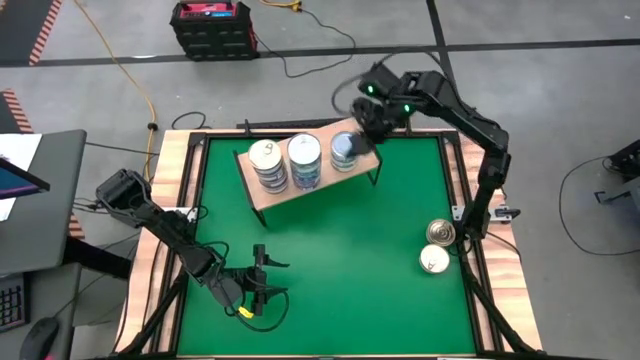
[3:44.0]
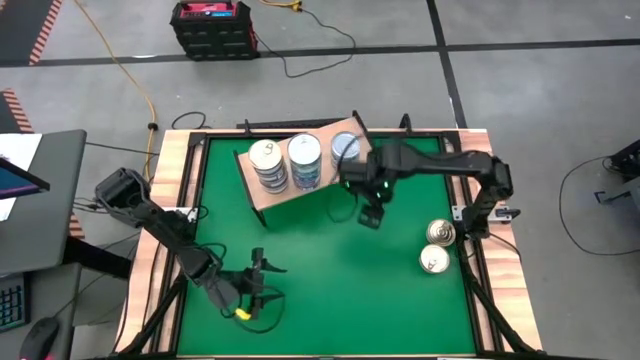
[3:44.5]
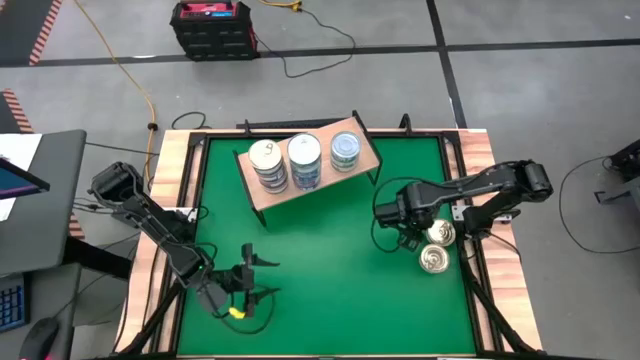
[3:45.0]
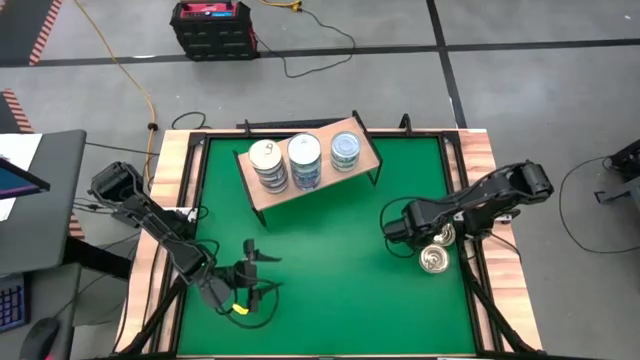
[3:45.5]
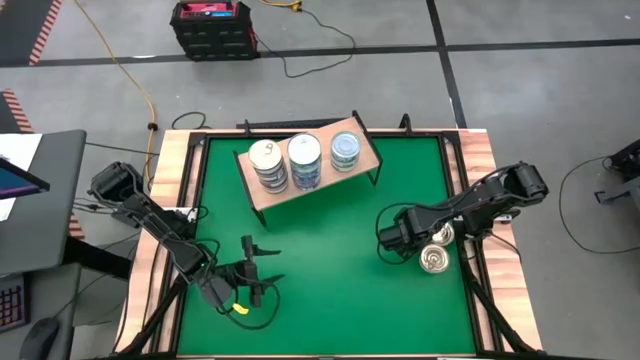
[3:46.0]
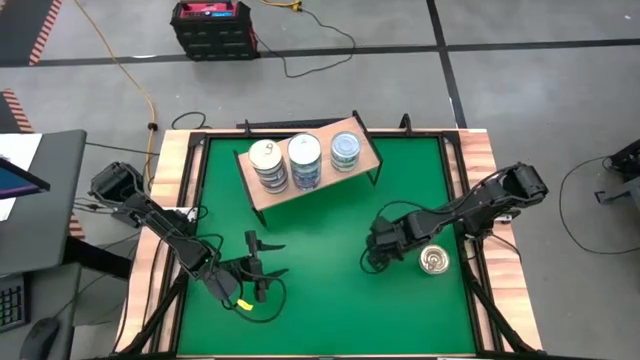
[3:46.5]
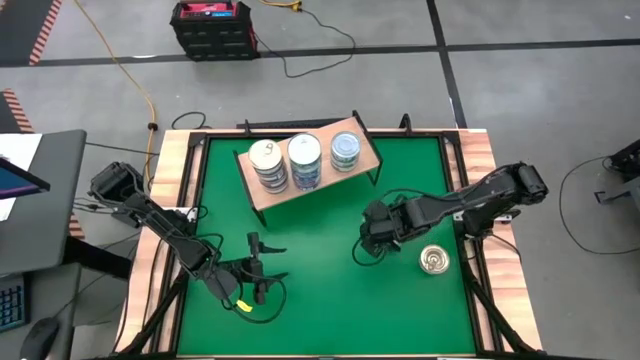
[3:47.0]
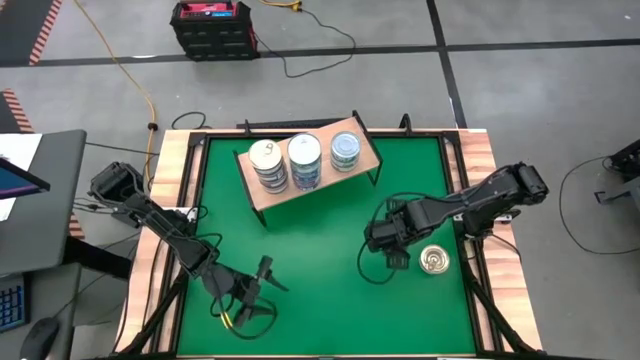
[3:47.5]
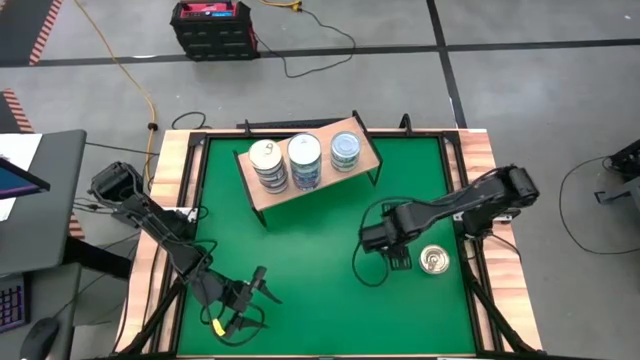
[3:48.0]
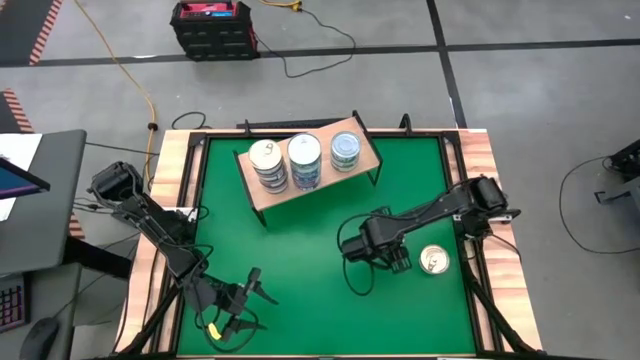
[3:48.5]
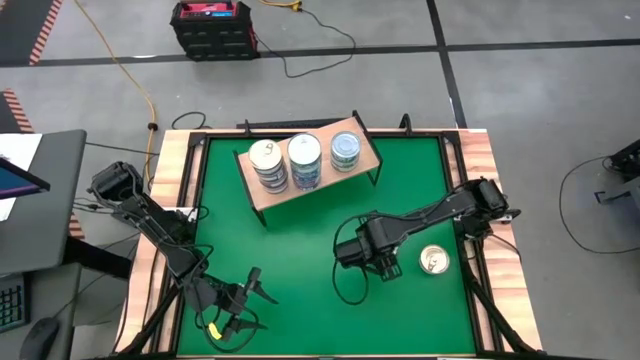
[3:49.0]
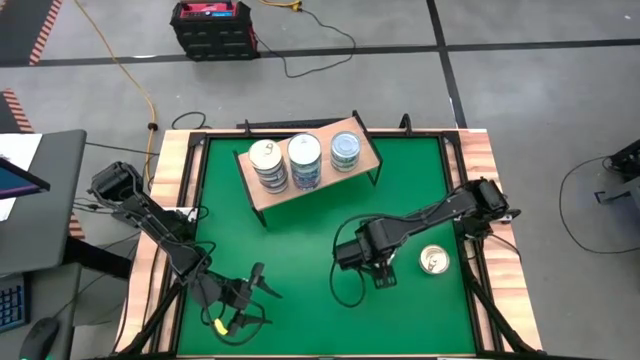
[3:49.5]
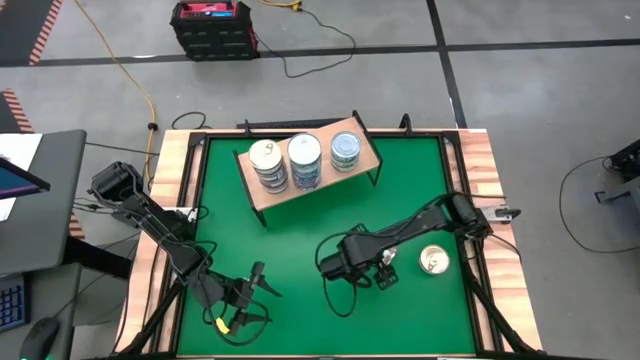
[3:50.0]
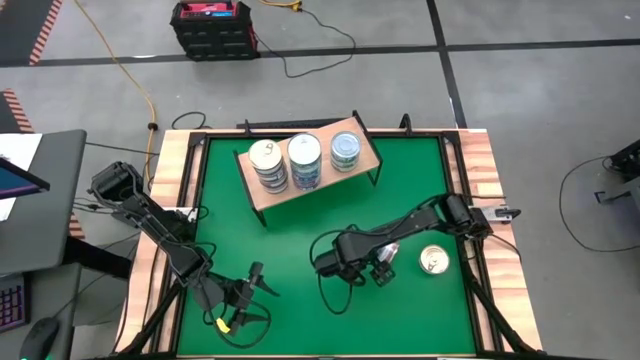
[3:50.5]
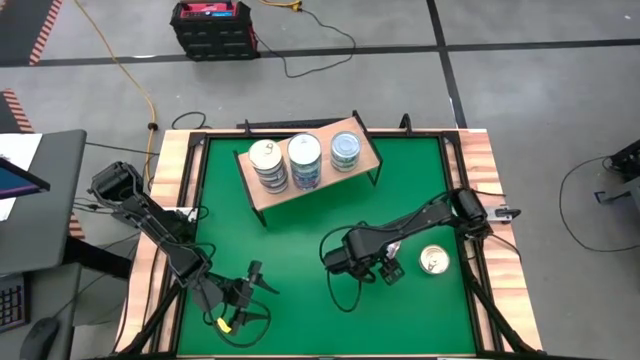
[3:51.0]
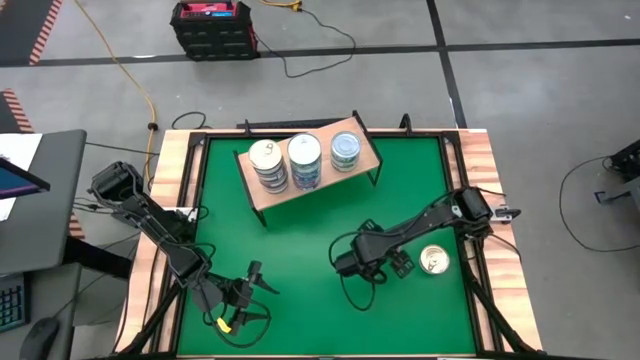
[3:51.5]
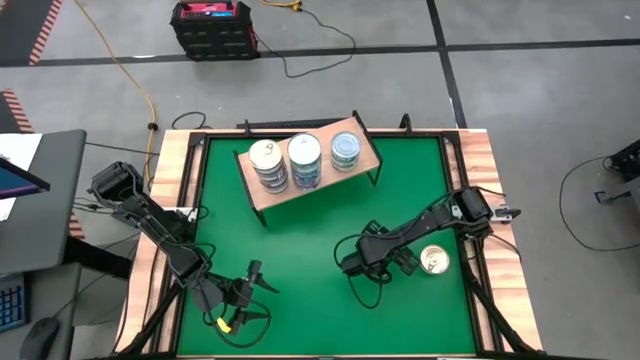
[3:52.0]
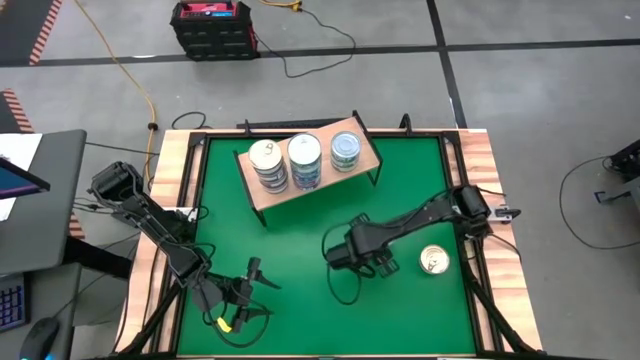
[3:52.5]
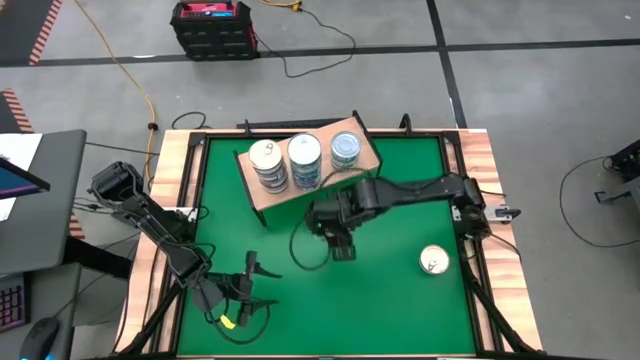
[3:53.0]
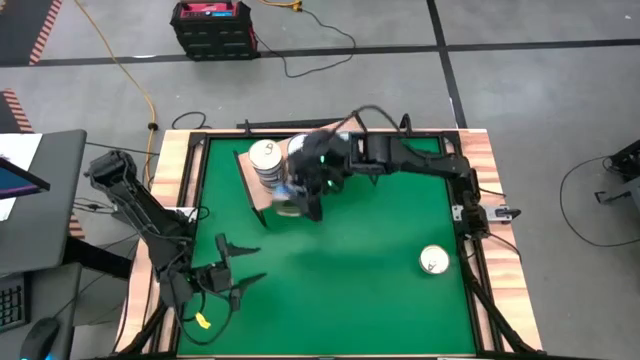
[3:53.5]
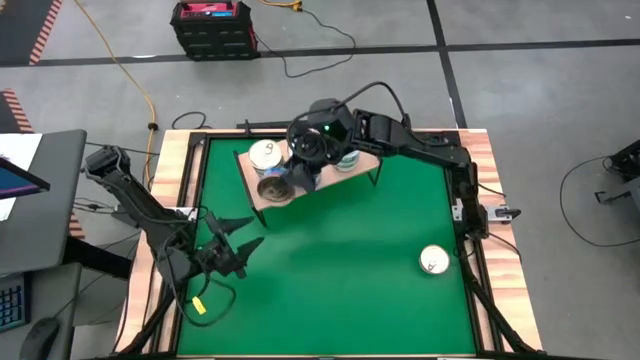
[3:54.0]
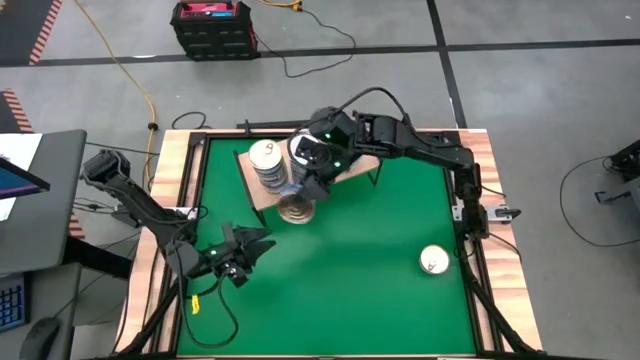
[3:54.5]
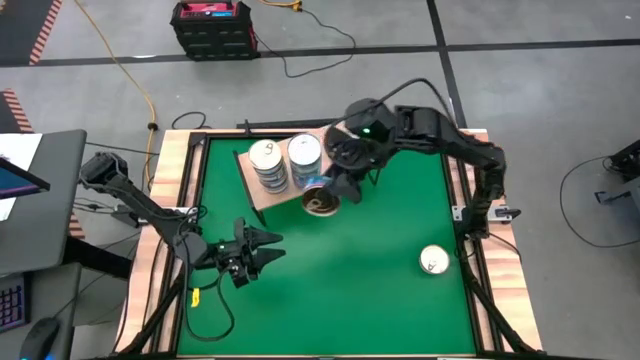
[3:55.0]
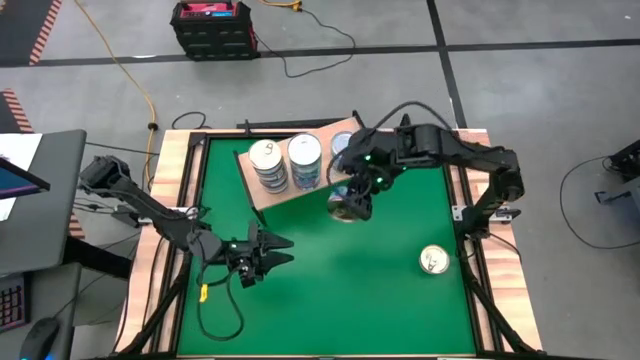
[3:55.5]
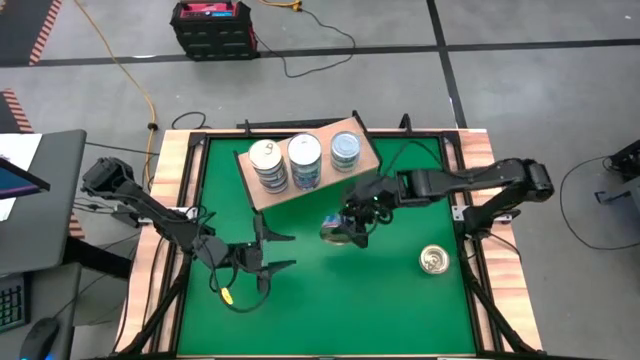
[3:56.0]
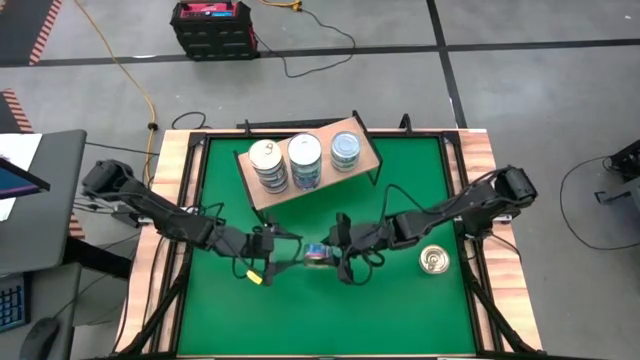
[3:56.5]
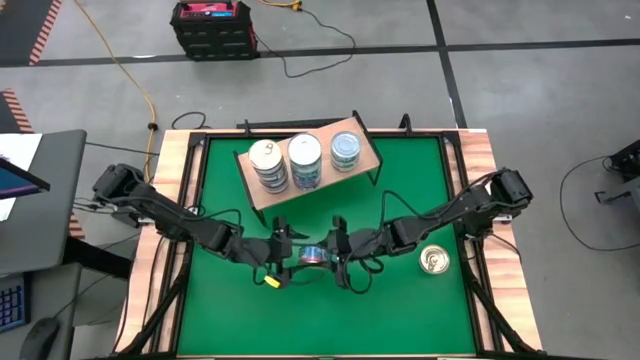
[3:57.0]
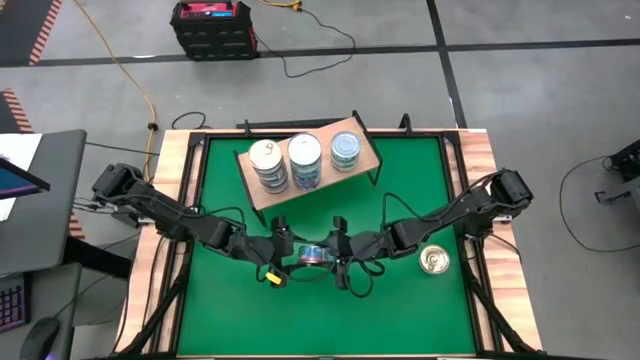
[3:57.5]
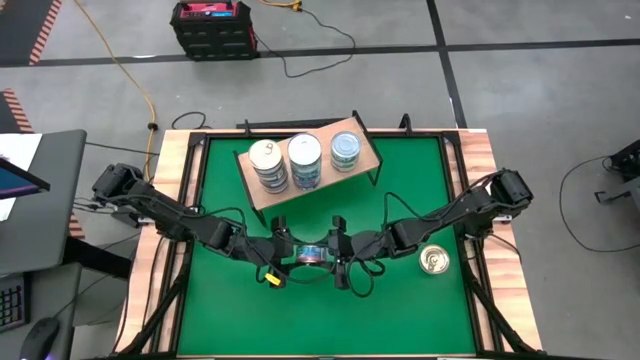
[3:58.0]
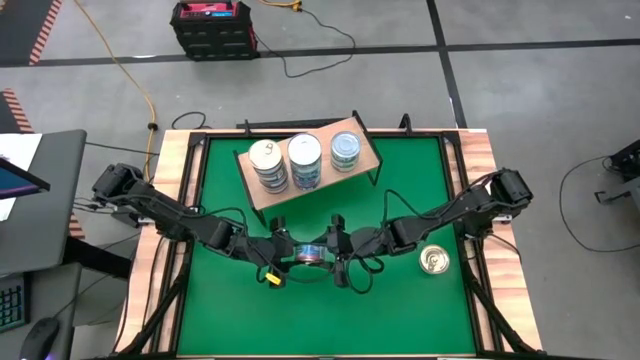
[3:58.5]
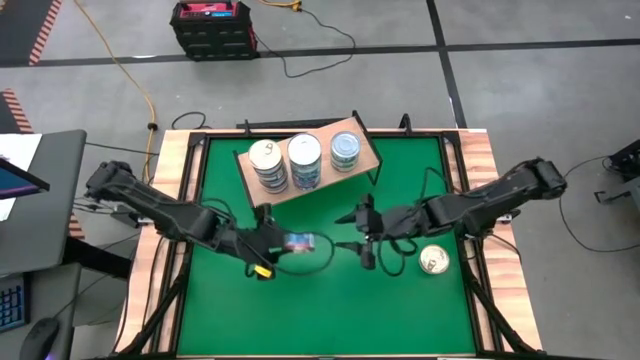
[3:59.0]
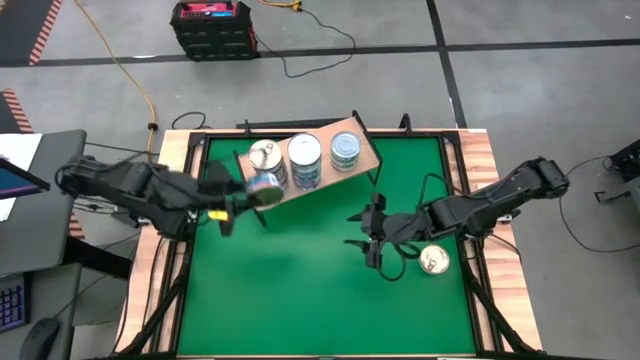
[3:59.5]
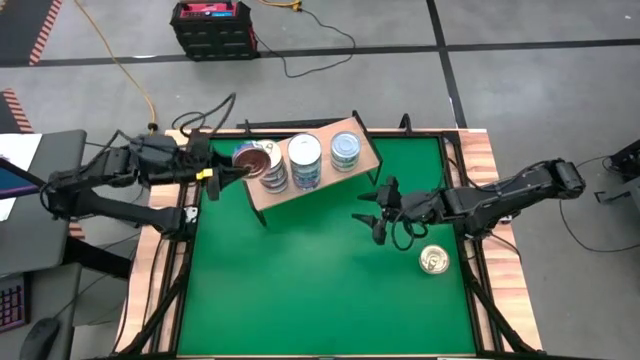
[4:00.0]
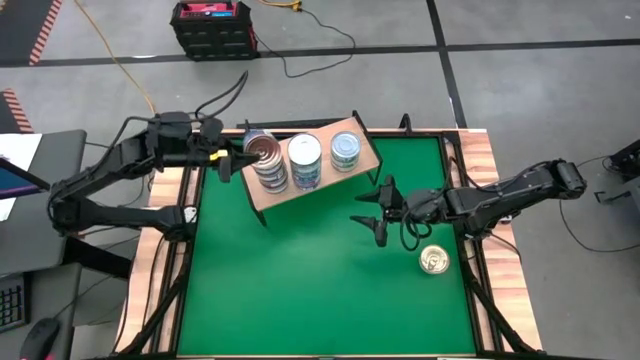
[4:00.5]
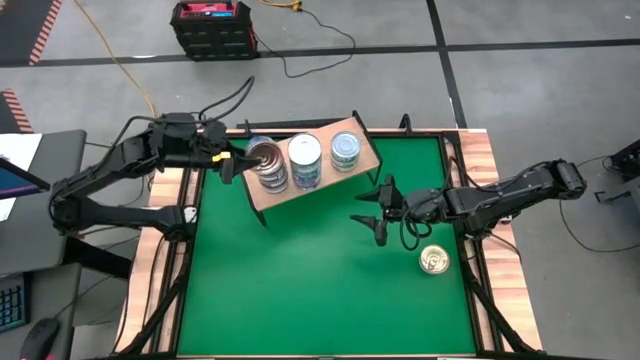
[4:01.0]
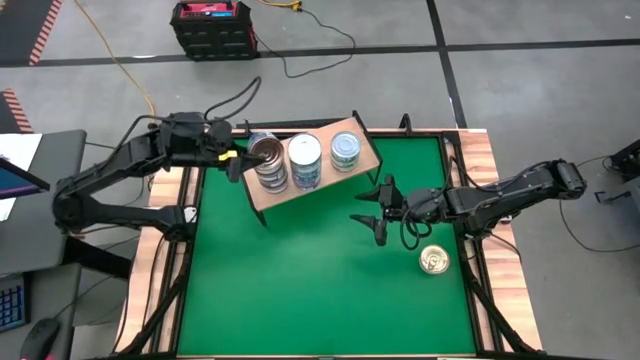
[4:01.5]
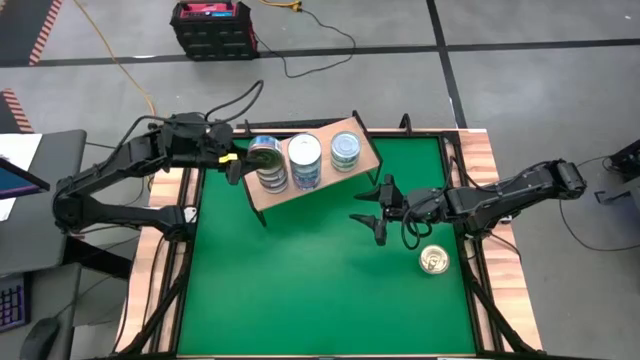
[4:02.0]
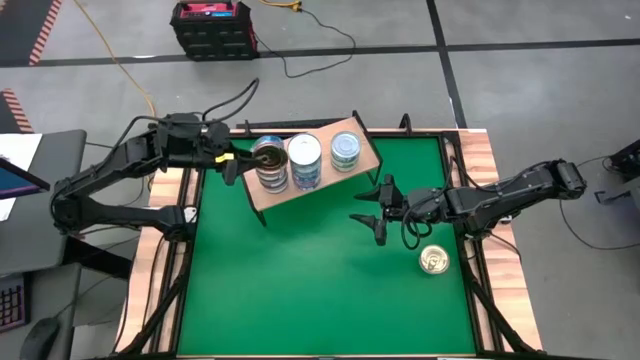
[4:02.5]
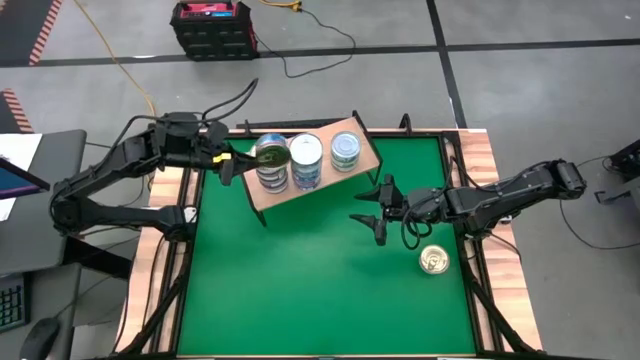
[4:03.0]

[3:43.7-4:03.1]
Task: Stack canned seafood by type on shelf
Stack the blue pink tuna can on top of the blue pink tuna can on the shelf

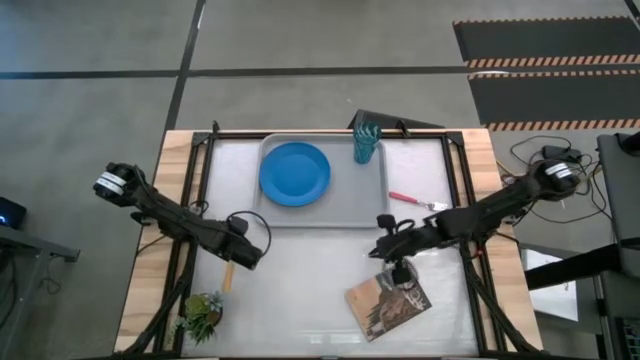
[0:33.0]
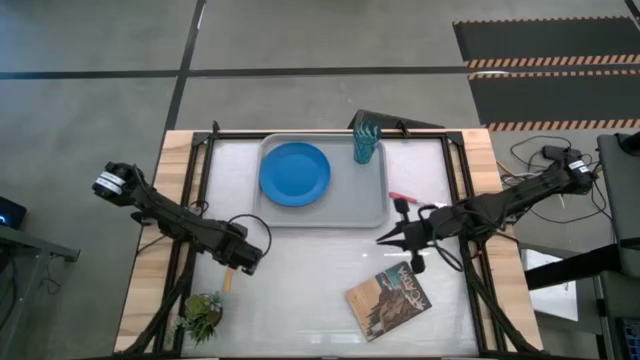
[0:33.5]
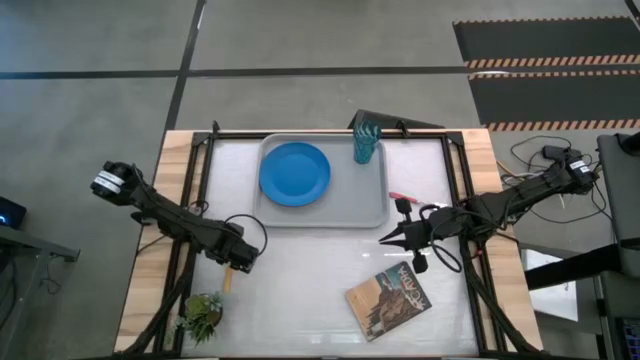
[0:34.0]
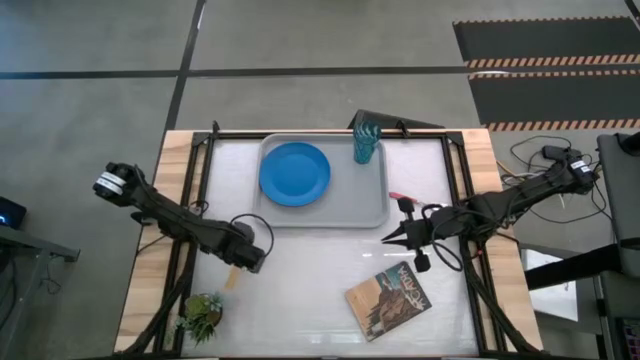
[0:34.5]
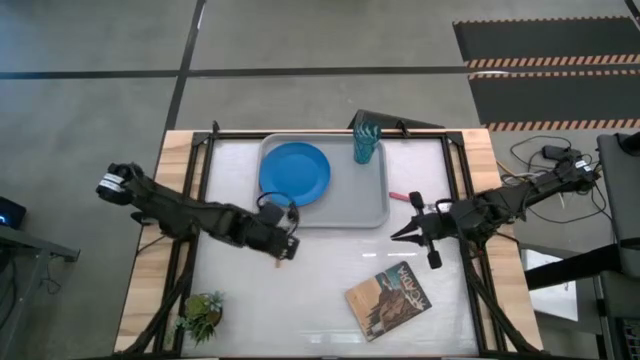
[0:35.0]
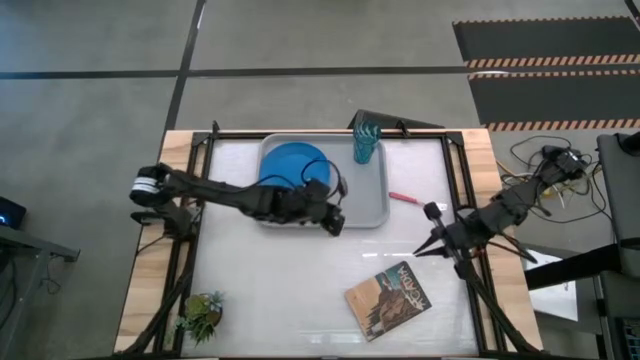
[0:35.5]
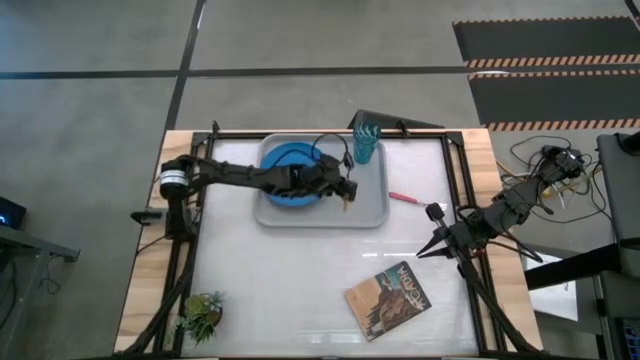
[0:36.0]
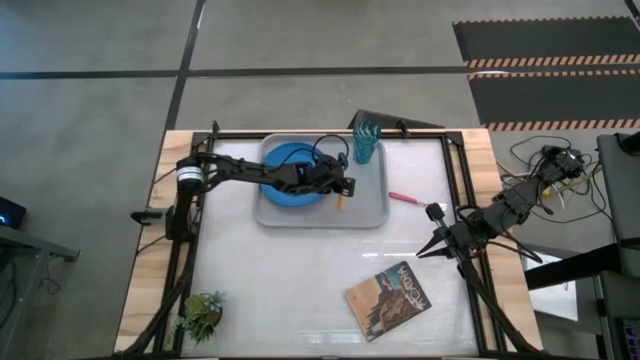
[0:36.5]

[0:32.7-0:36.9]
Task: Pick and place plate/cup/fork/spoon on tray
Put the yellow spoon on the gray tray to the right of the blue plate
